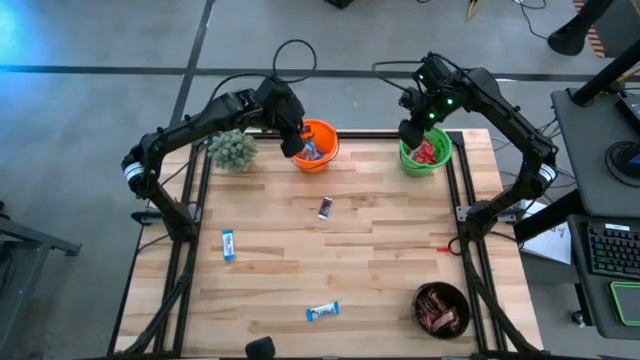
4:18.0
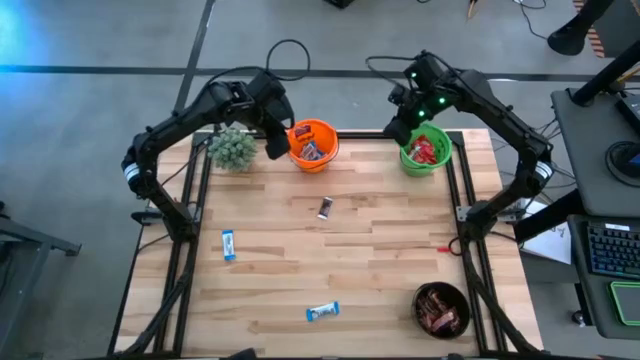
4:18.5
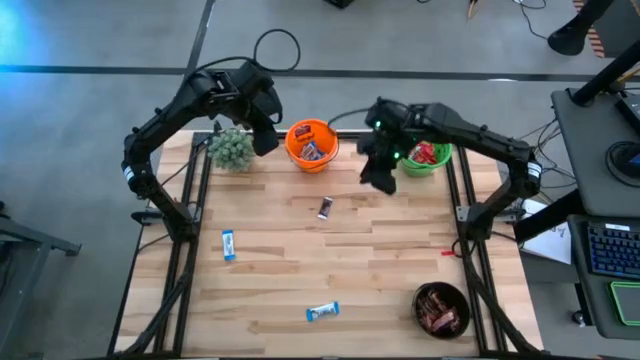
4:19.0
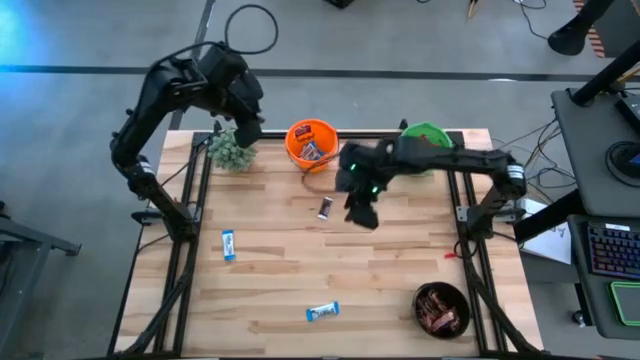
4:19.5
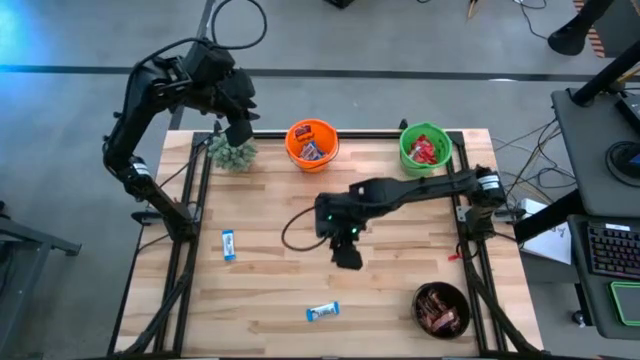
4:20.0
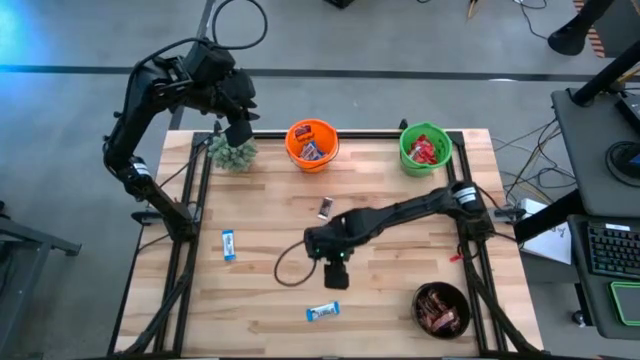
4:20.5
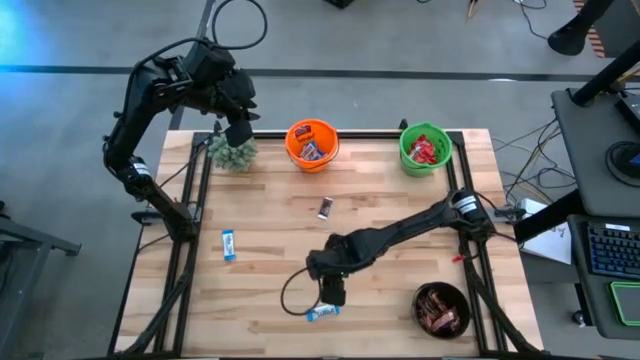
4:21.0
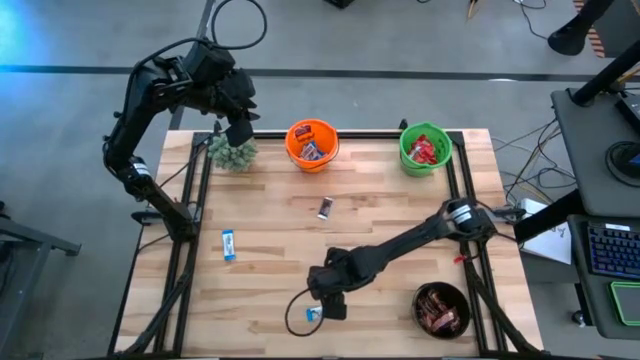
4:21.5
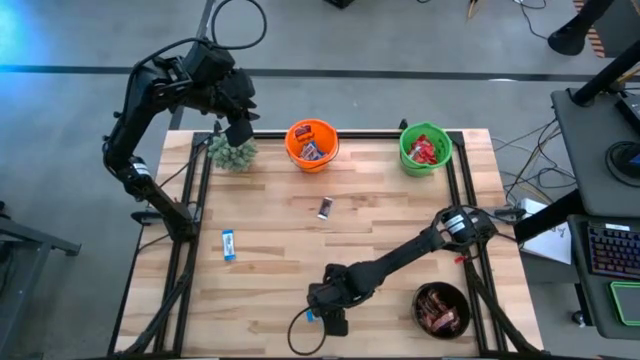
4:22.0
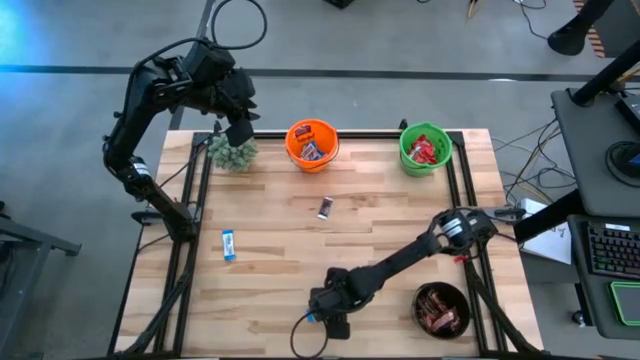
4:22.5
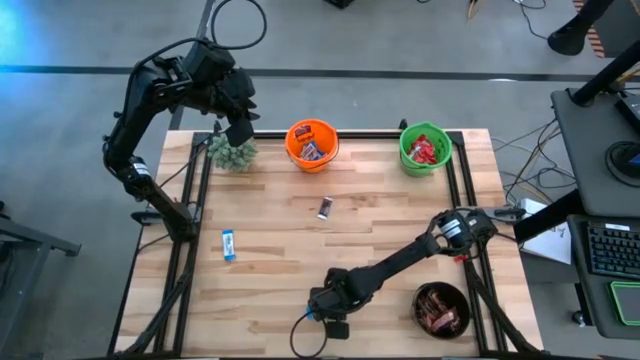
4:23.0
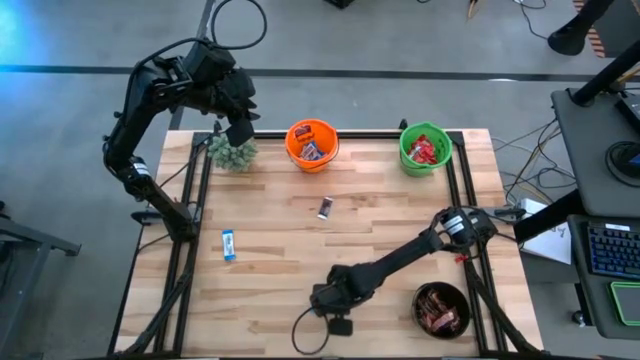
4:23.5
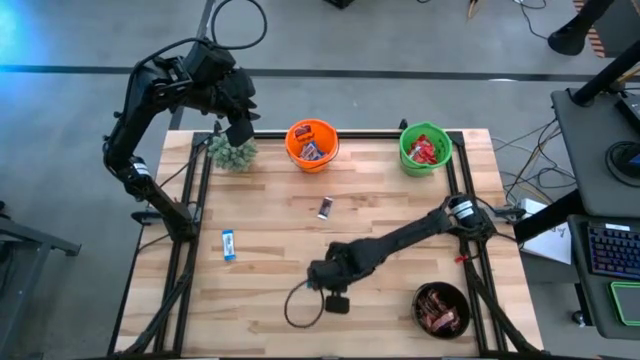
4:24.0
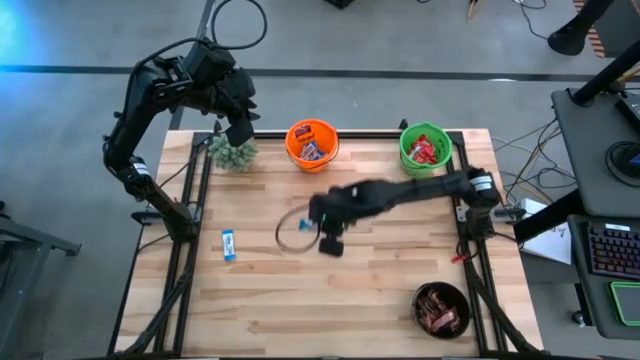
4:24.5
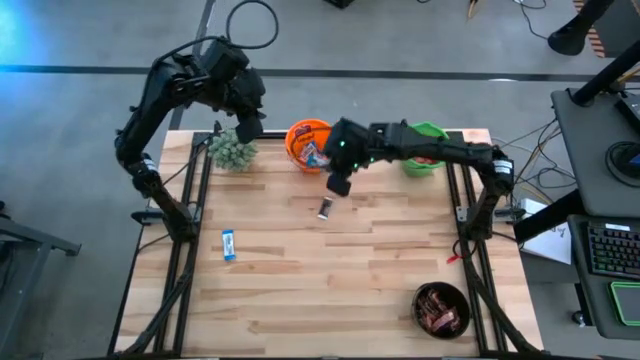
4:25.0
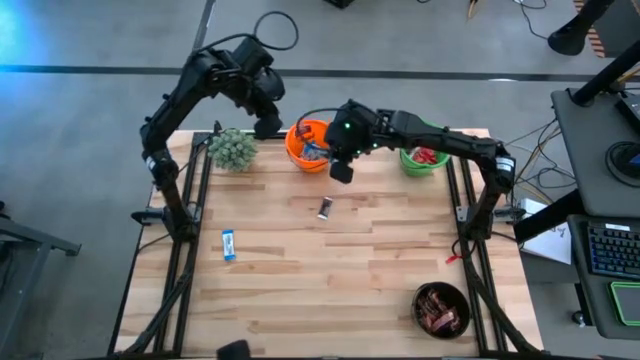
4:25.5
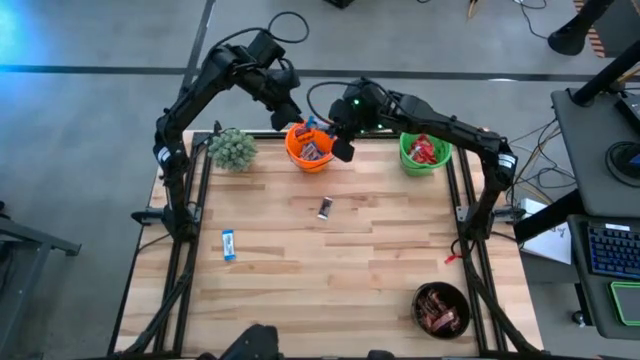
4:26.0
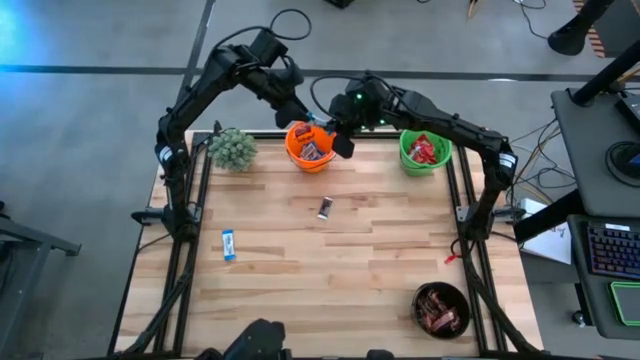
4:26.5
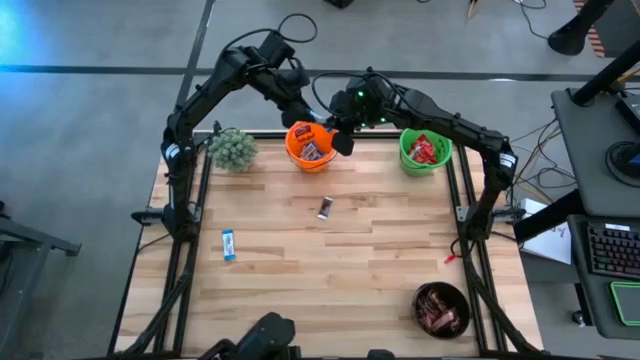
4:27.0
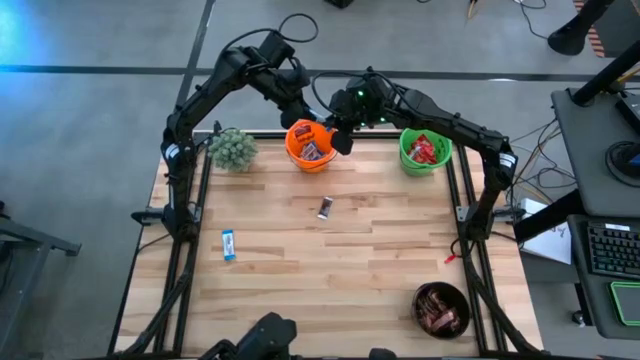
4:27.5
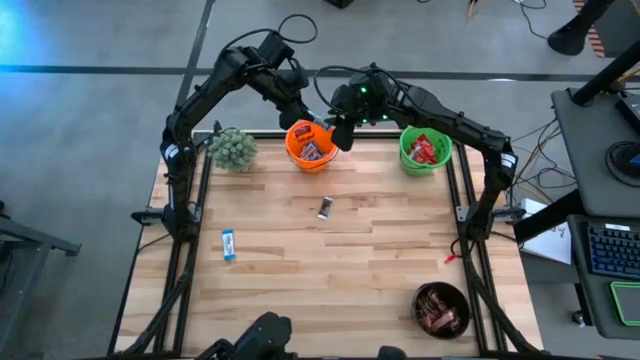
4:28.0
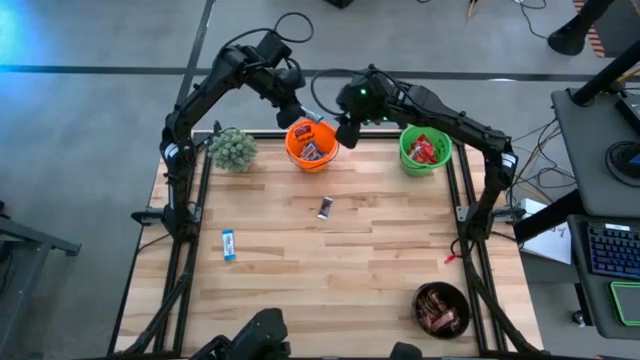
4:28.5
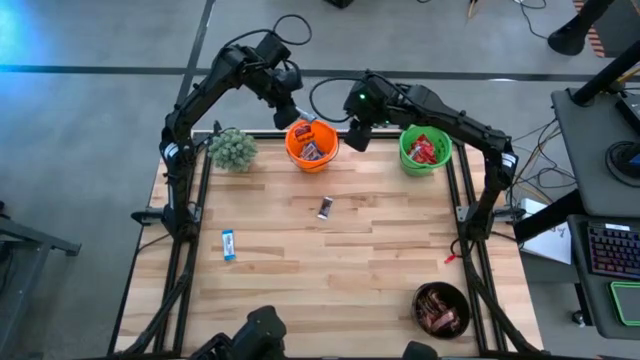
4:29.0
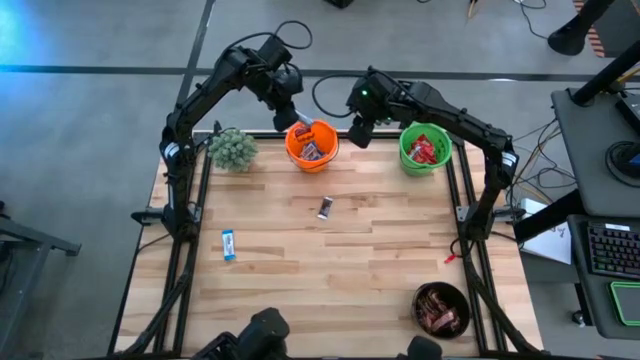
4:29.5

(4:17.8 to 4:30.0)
Task: Sort candy
Put the white chocolate into the orange bucket

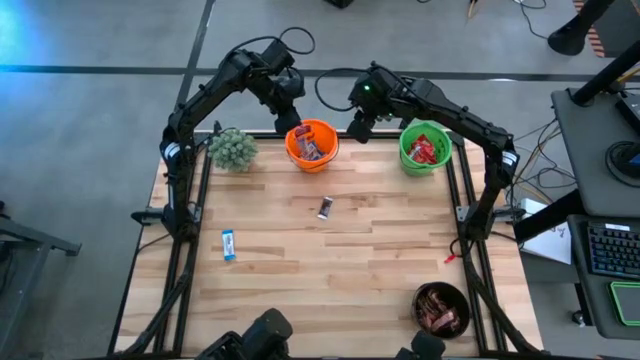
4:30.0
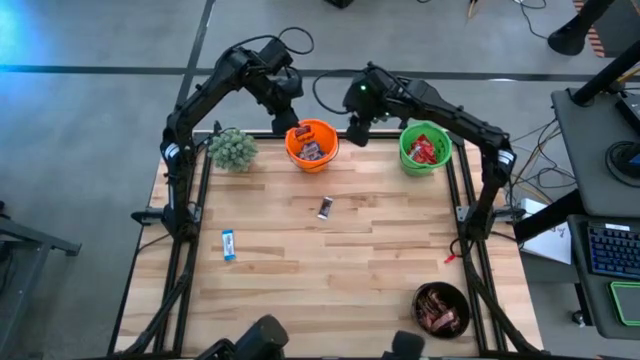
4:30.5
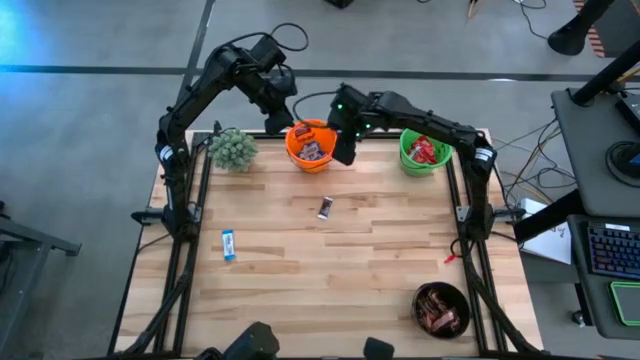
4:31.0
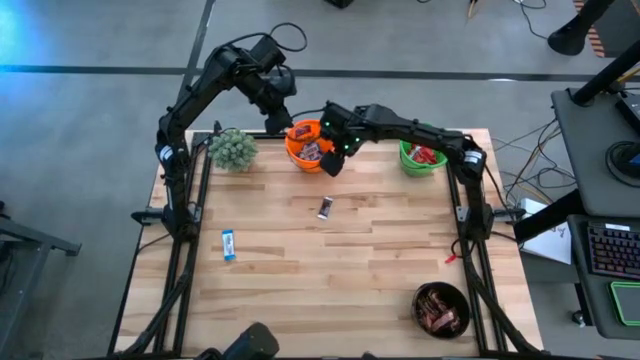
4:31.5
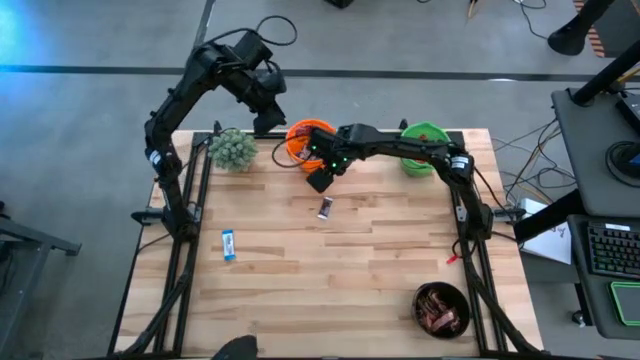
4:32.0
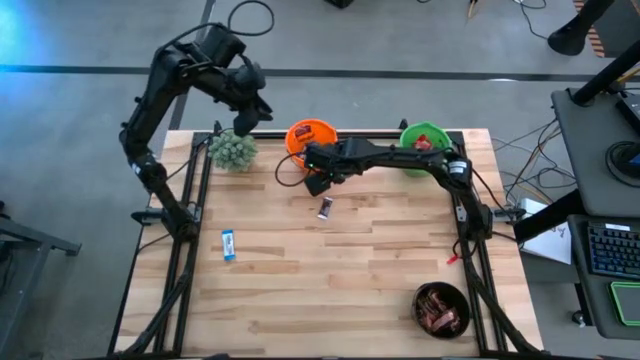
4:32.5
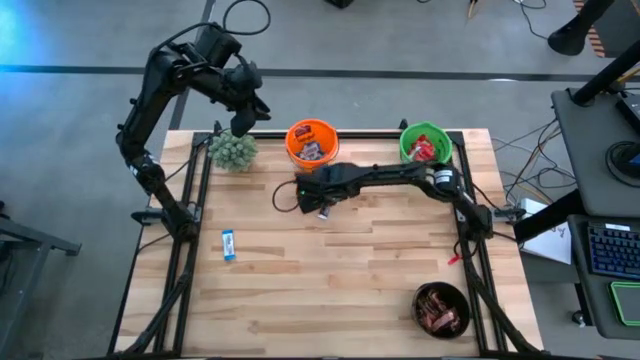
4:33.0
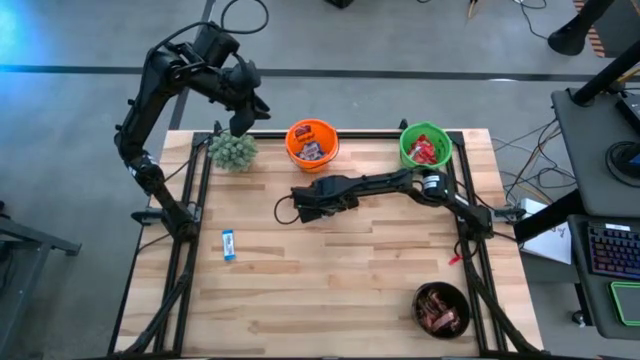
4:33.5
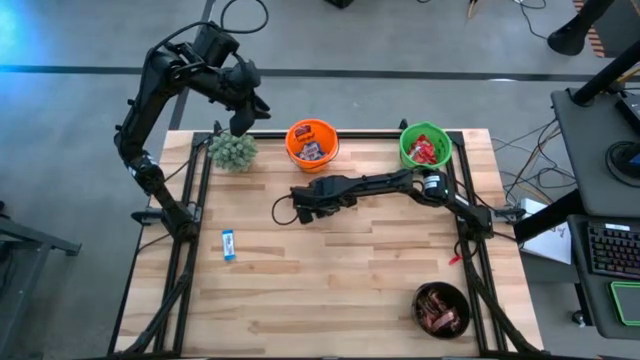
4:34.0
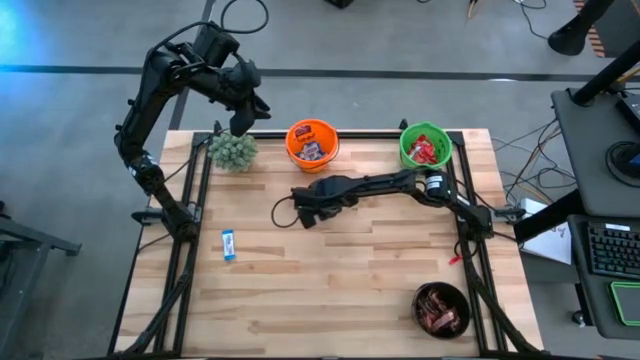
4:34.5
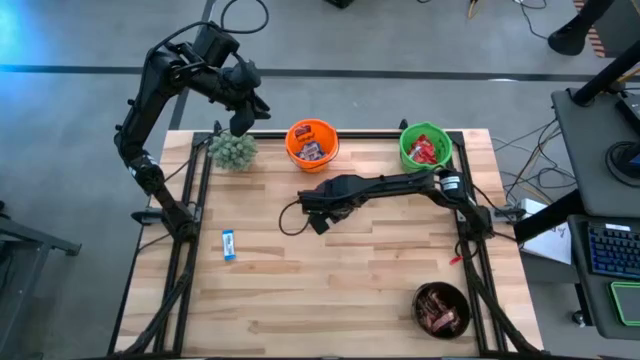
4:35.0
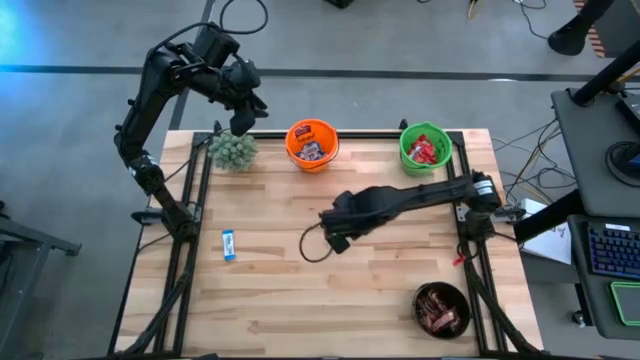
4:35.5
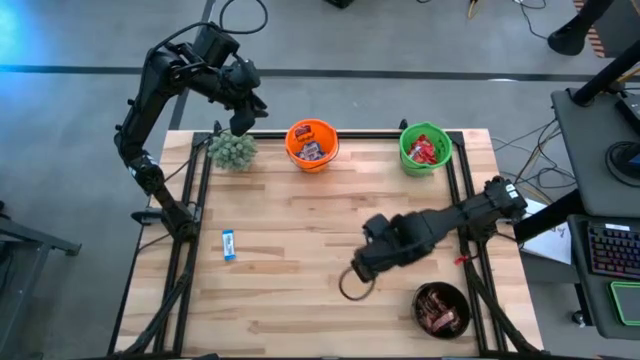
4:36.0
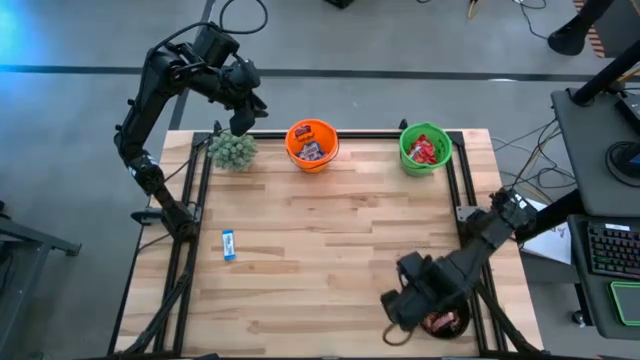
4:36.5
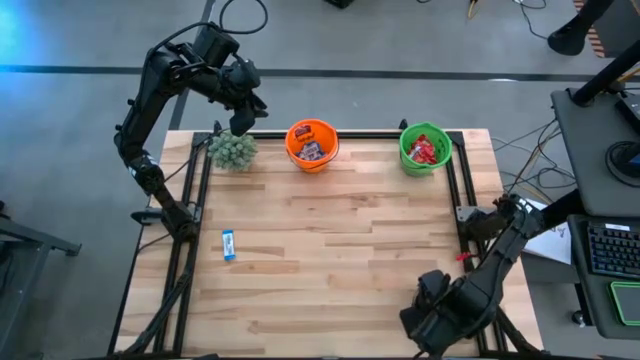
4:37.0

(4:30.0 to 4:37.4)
Put the brown chocolate into the black bucket

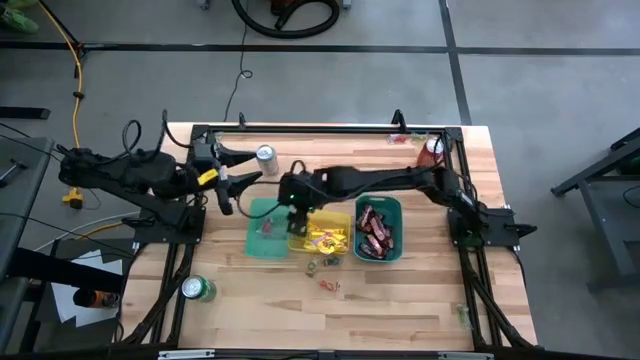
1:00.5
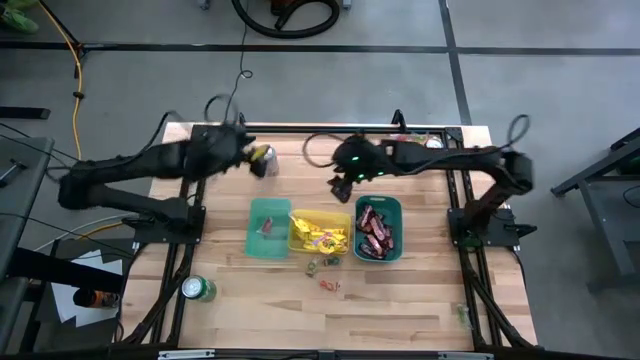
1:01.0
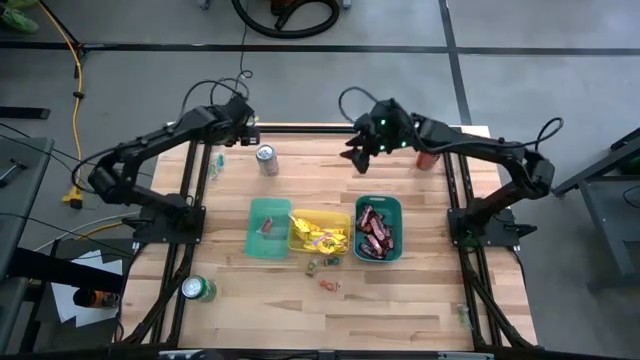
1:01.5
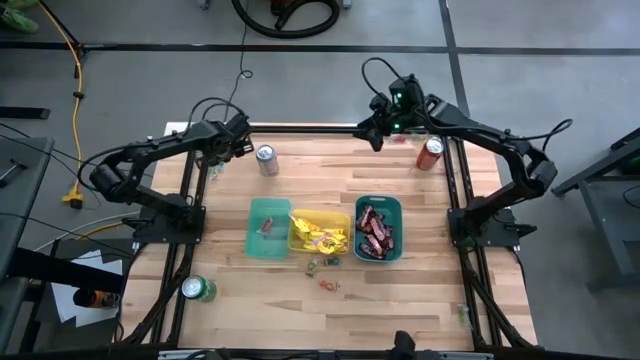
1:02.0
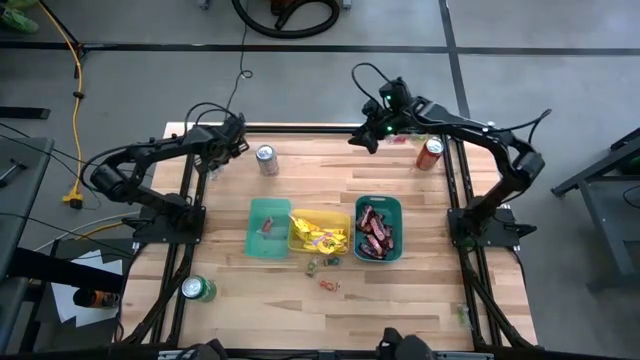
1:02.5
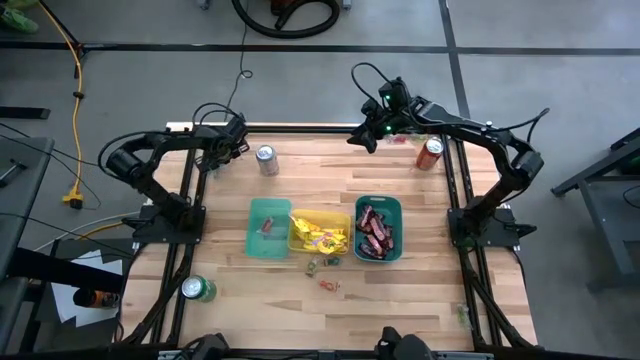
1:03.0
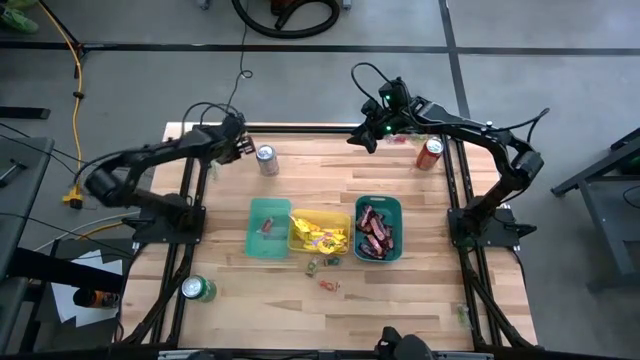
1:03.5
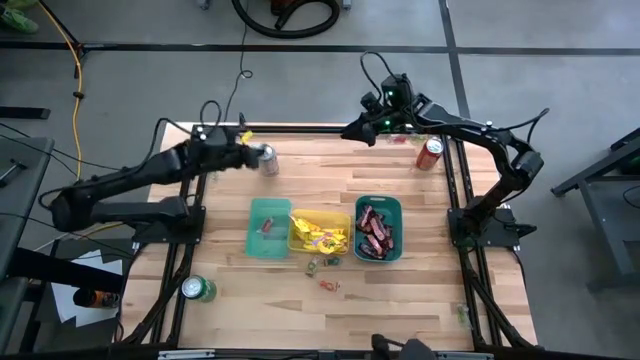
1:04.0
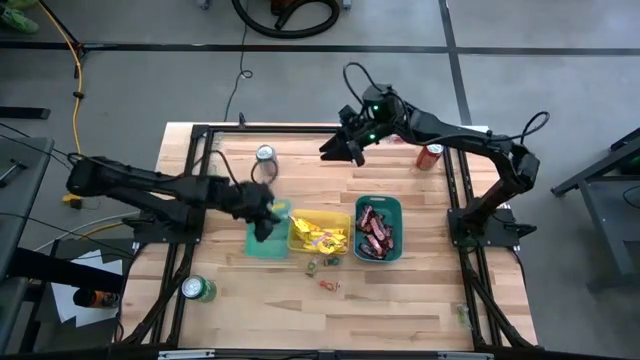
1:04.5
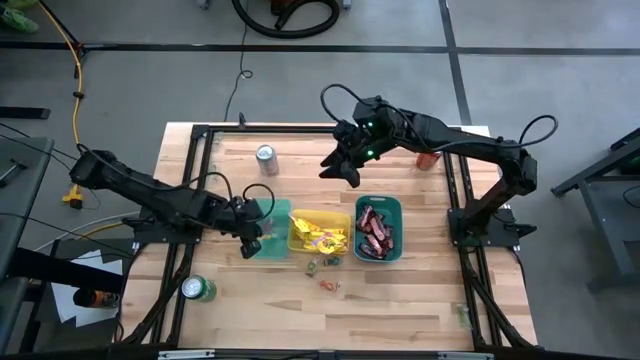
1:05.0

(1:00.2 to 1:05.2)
Task: Sort candy
Put the blue gummy into the green bin
